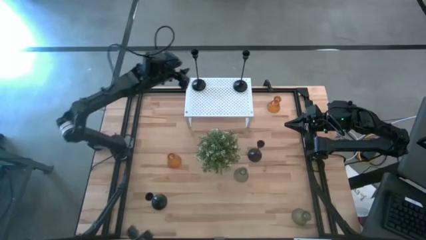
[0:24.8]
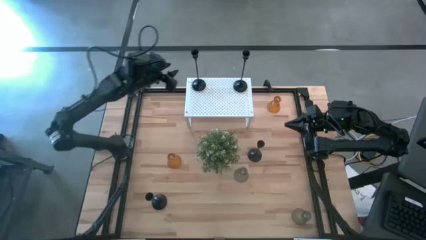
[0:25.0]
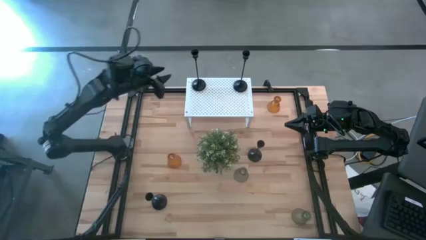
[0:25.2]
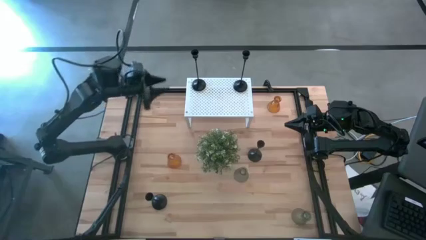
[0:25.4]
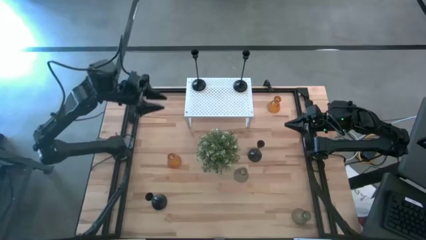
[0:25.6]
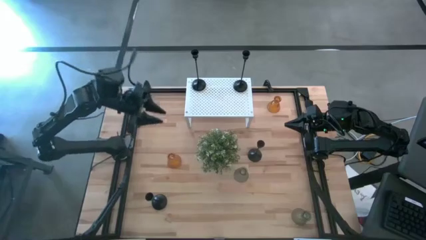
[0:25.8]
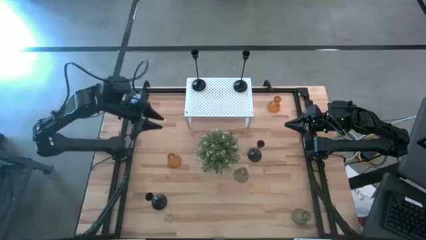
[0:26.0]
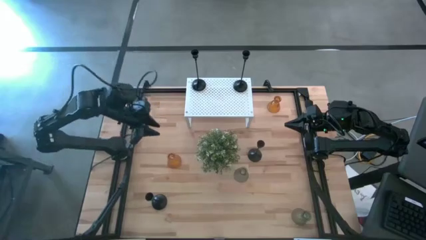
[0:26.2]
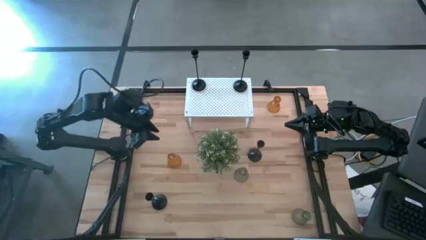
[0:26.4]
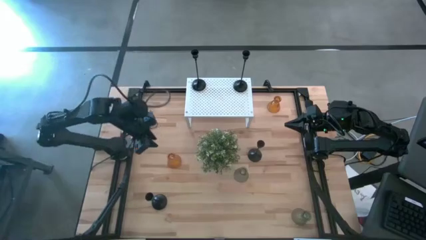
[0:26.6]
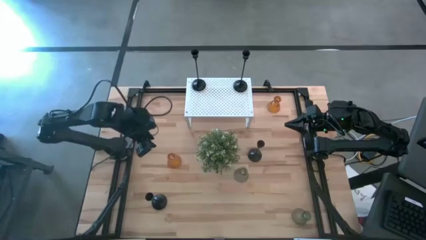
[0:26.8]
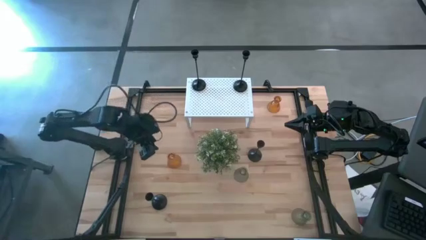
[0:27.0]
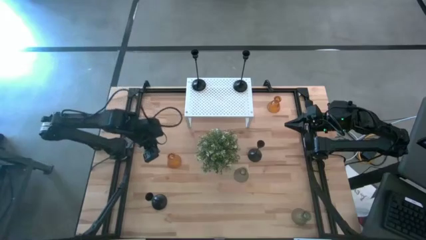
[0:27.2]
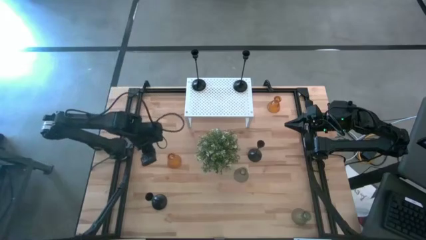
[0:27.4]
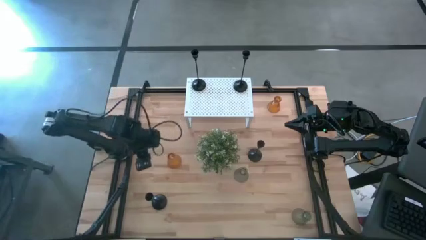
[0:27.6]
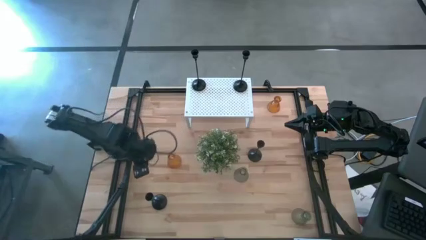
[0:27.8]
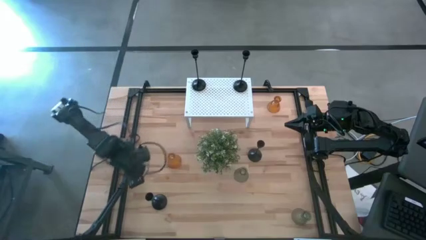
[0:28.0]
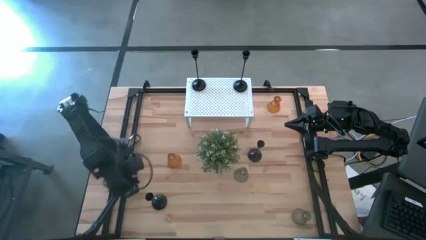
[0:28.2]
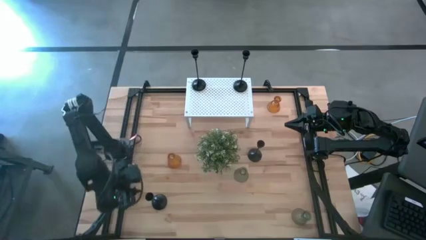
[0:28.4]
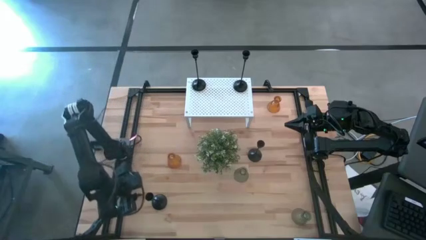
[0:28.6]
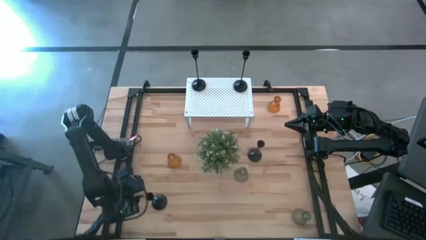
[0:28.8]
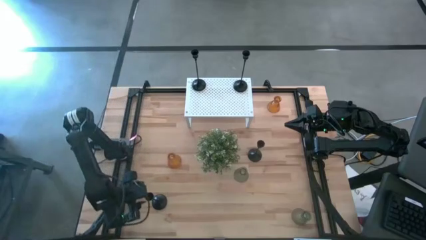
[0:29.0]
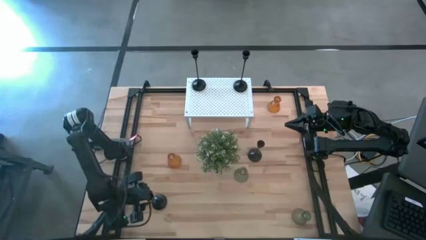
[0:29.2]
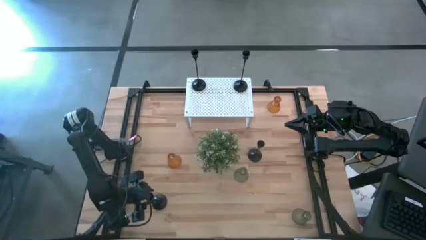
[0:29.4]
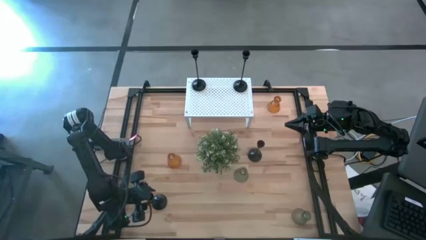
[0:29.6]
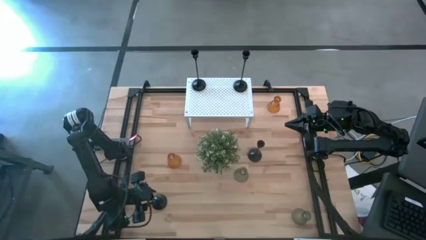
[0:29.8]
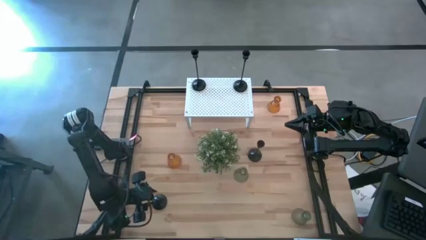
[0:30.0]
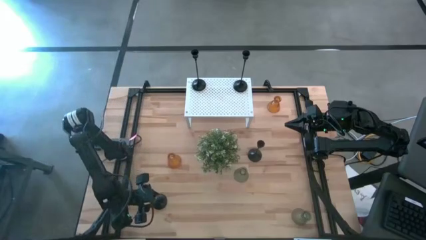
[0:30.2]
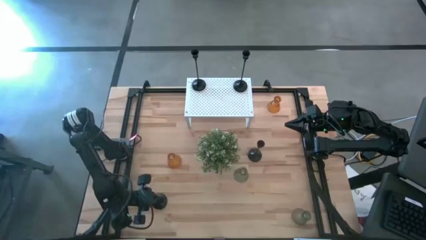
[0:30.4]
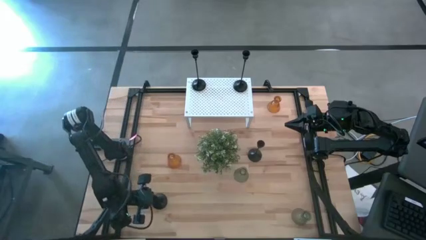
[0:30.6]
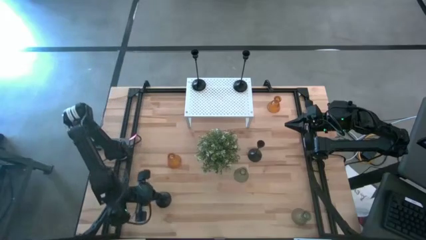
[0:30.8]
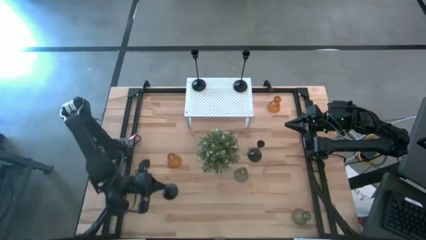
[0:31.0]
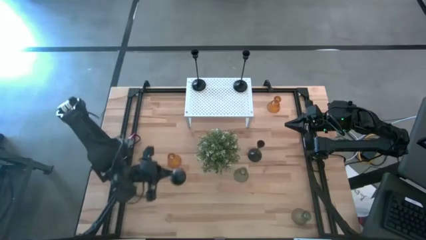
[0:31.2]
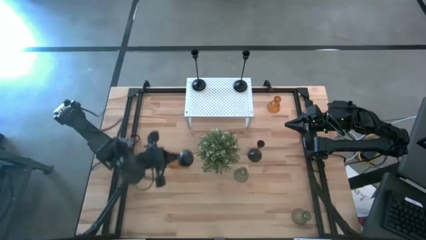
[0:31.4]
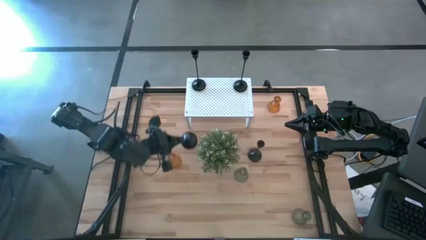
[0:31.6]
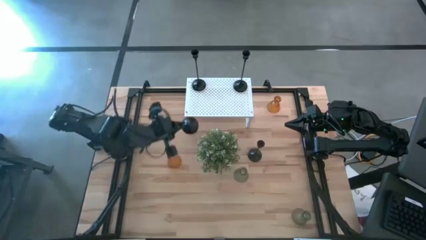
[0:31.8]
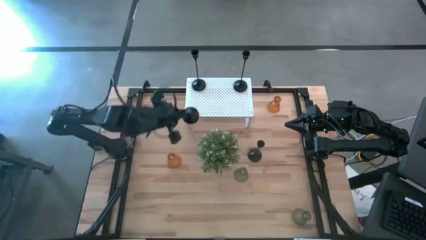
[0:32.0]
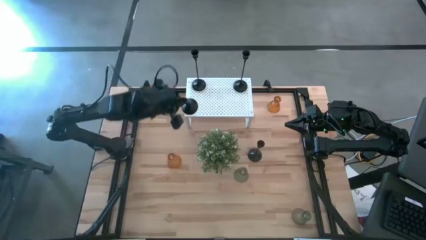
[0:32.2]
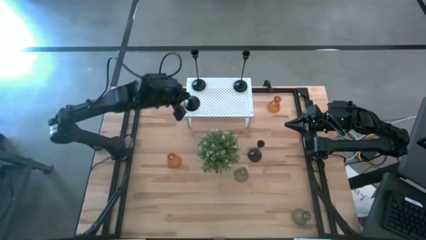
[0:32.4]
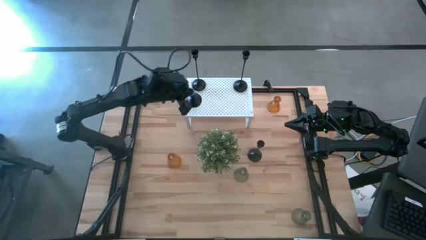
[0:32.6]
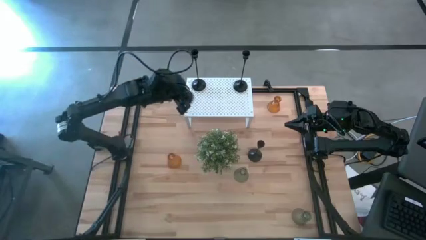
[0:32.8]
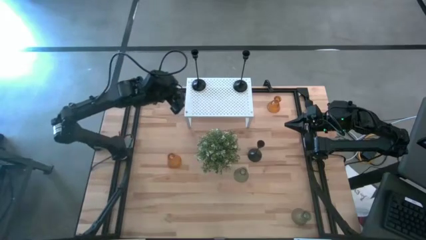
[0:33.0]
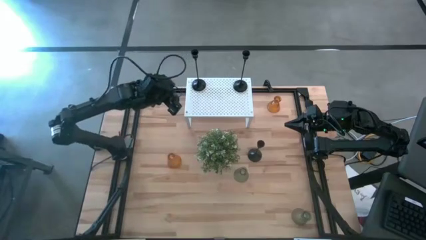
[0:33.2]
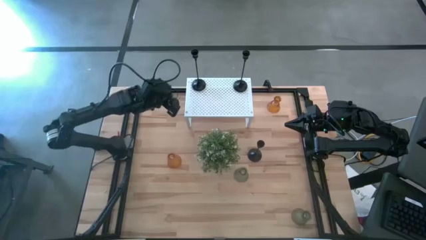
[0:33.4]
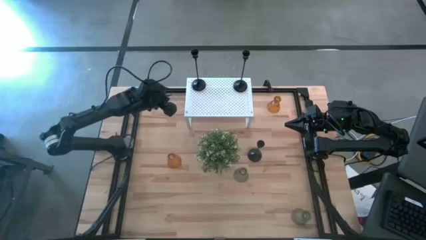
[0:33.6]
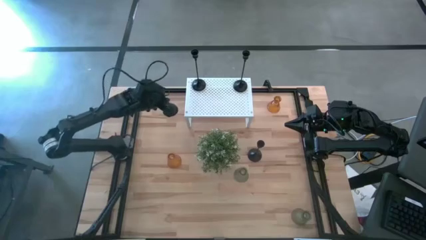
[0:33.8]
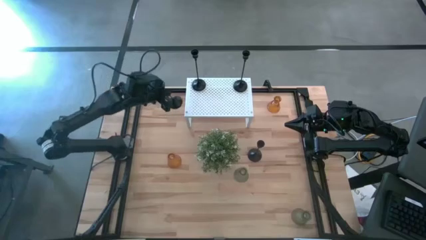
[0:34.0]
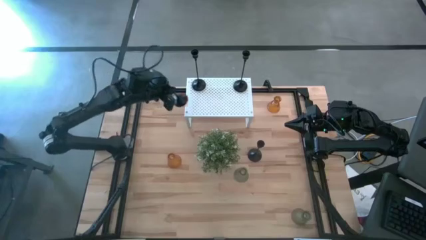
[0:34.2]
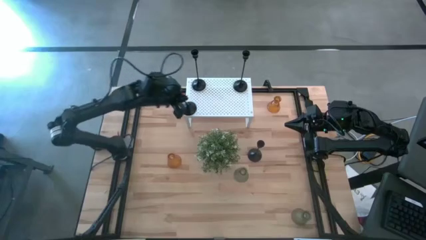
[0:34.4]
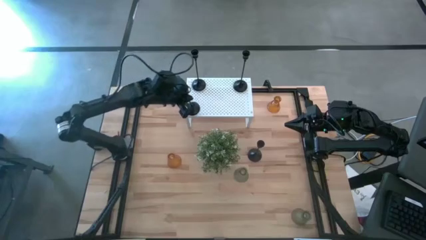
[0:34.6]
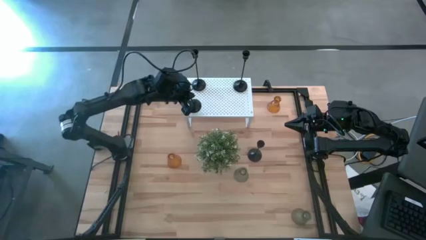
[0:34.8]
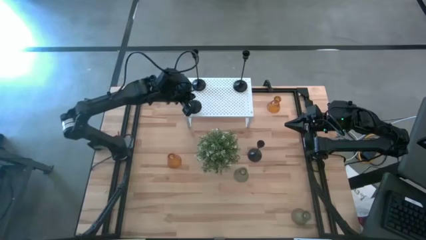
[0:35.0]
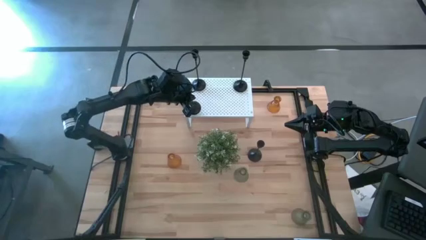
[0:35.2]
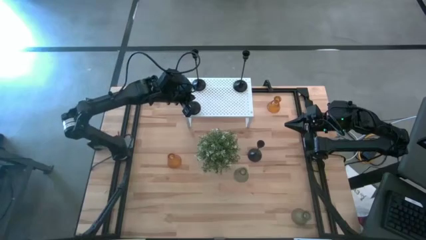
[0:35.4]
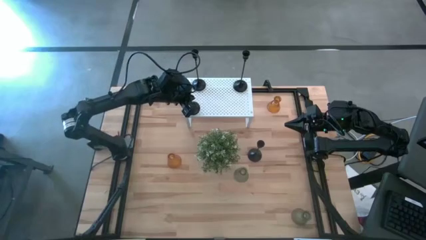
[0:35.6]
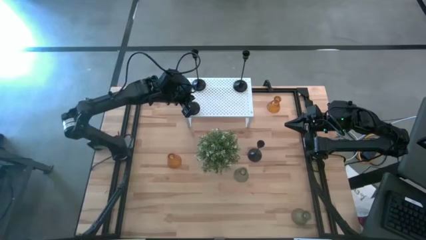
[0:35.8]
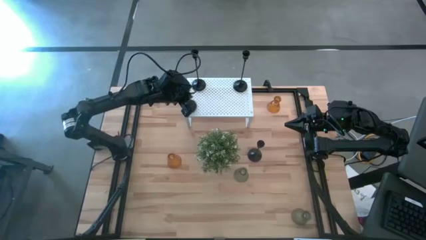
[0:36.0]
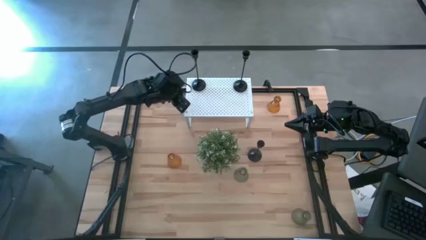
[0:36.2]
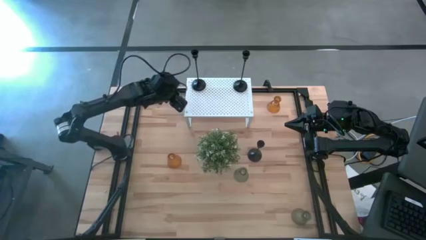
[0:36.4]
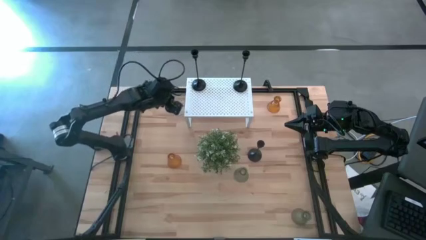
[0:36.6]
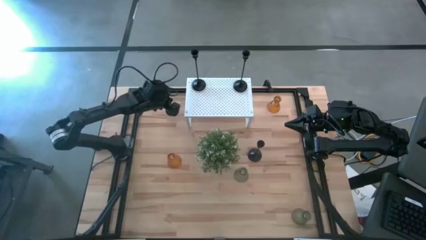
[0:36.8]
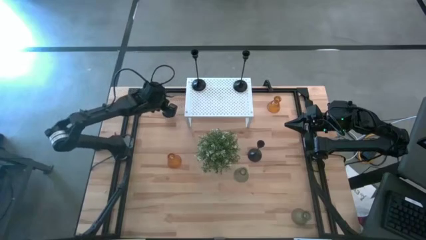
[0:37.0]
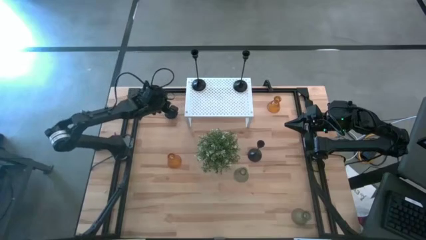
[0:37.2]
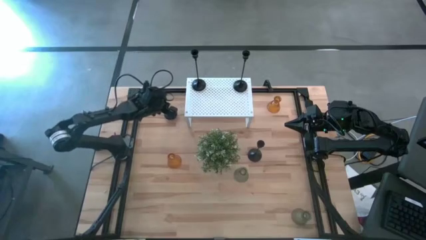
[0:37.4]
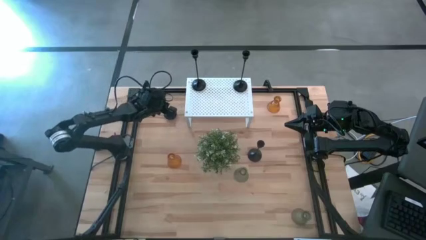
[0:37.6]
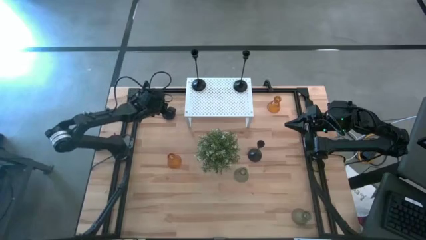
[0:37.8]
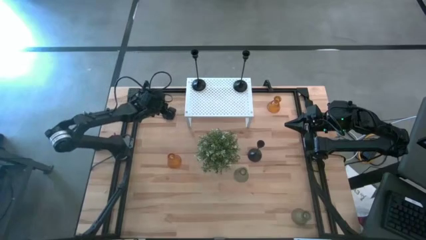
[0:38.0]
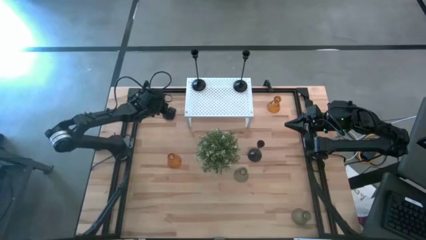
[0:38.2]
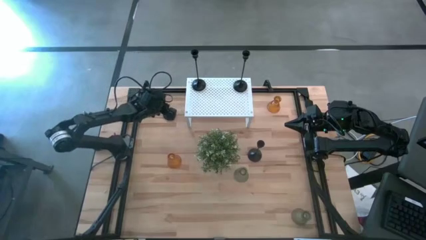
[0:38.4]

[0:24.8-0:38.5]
Task: Pick & Place candle stick holders
Move the bottom black candle holder to the top left of the table
